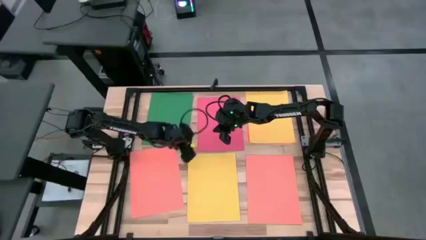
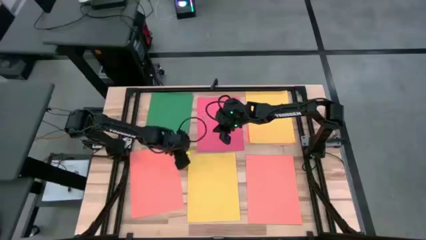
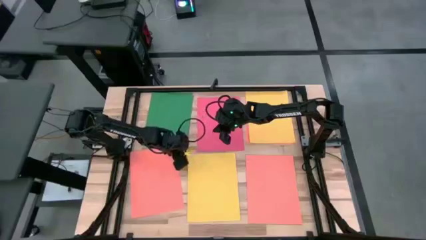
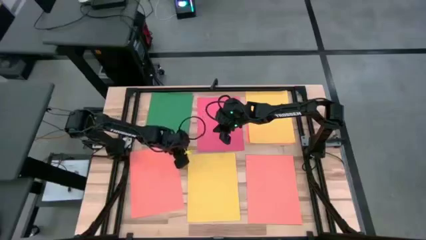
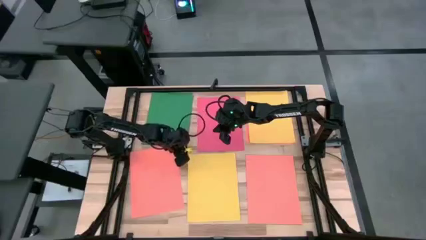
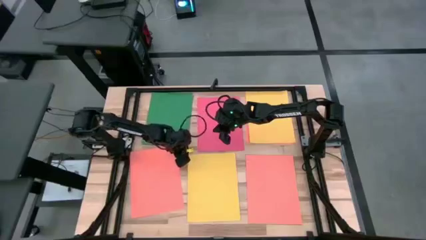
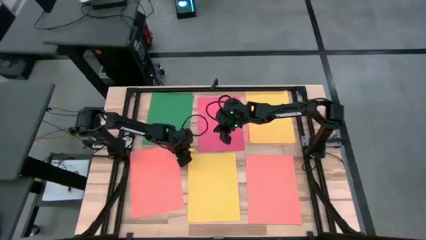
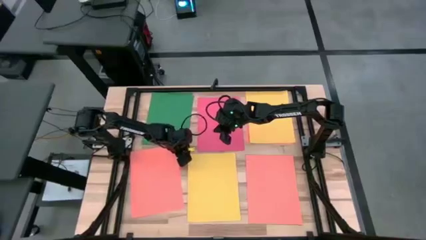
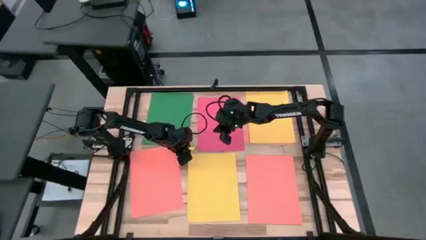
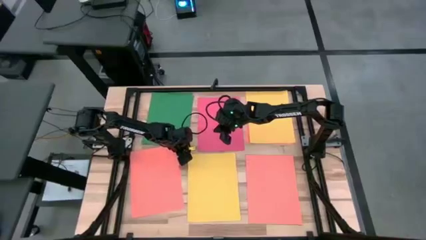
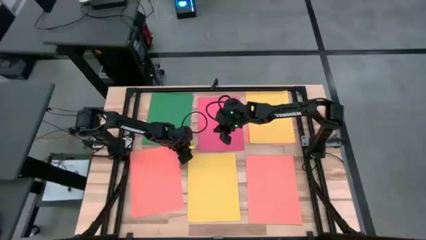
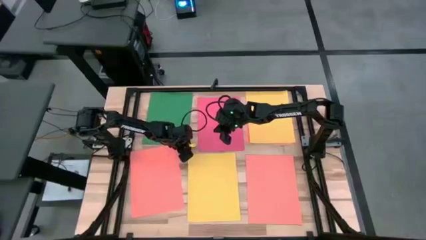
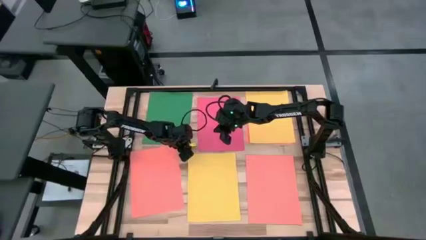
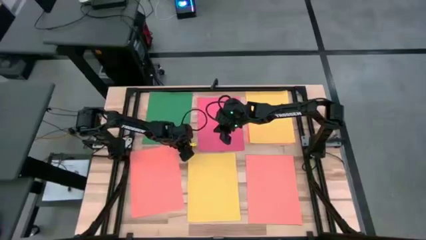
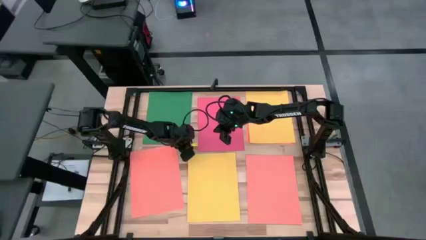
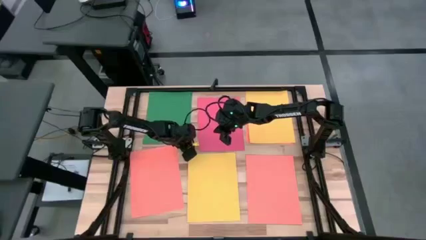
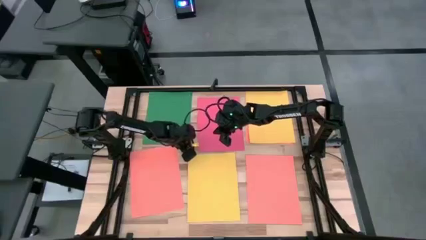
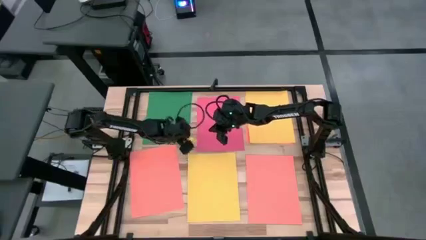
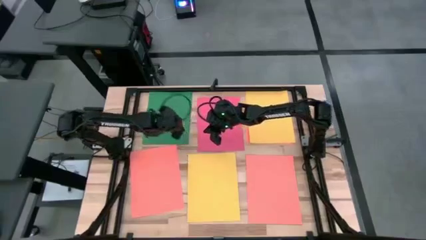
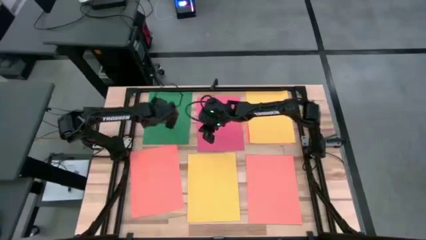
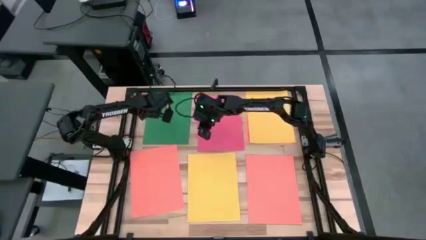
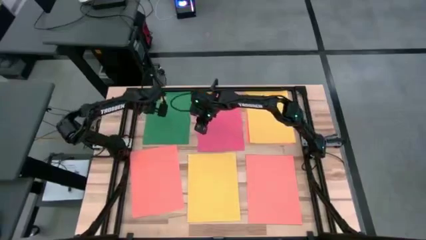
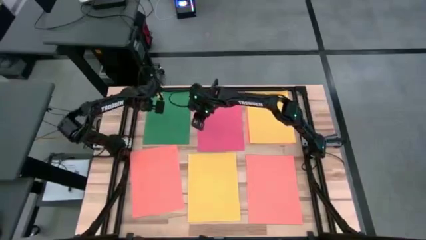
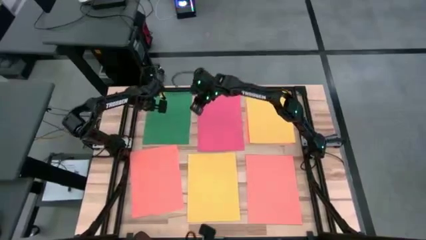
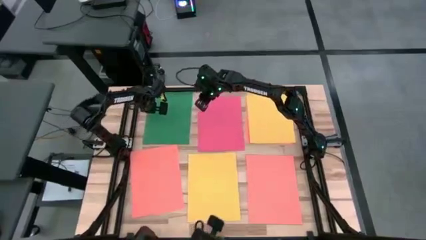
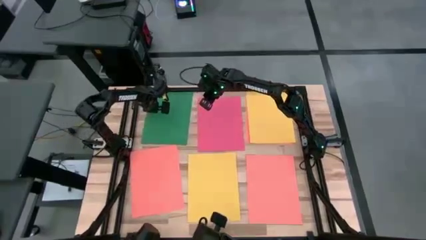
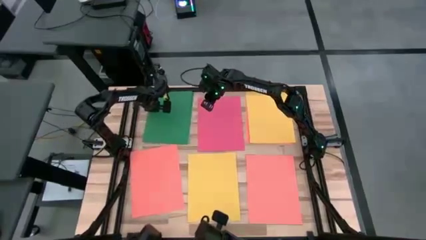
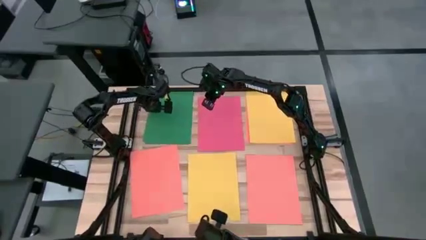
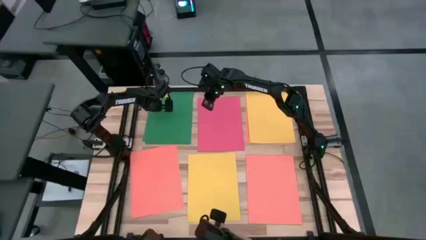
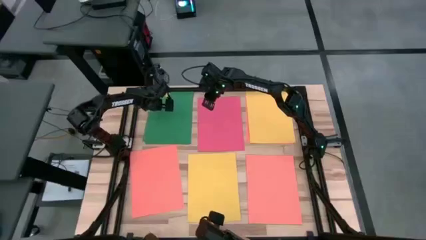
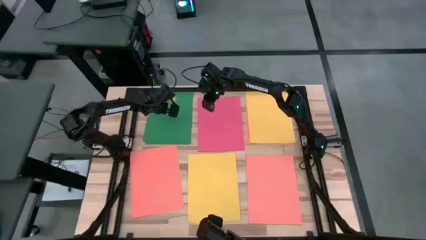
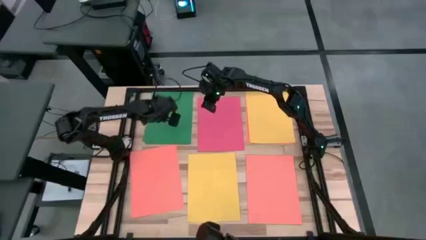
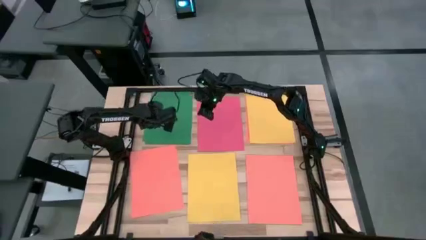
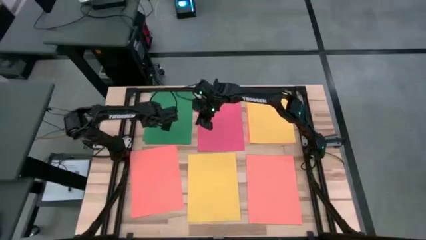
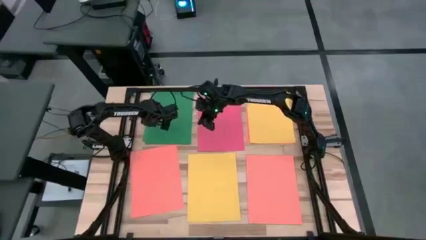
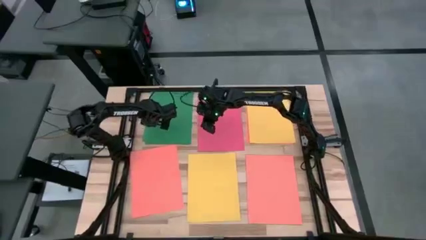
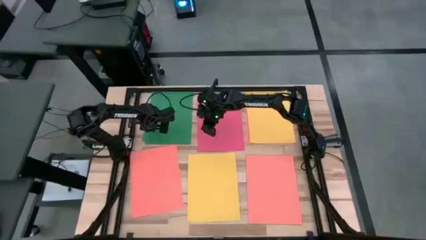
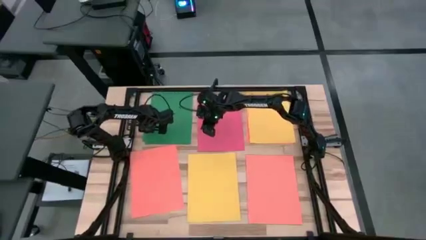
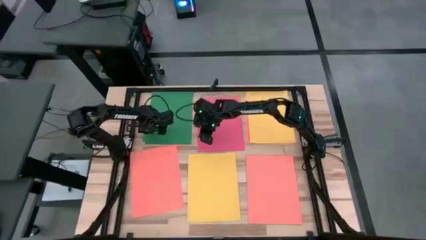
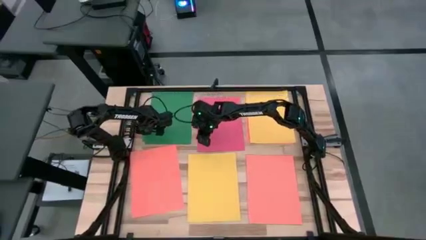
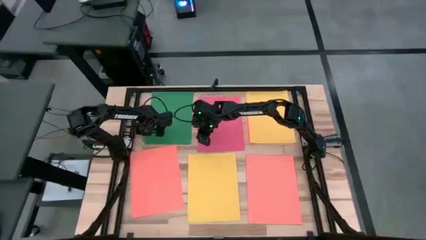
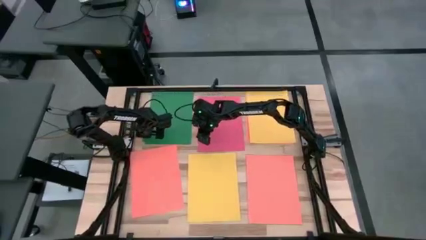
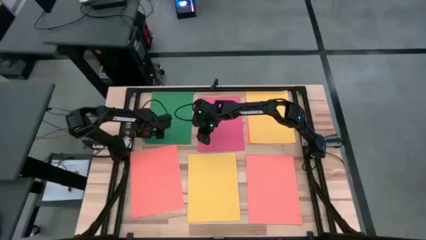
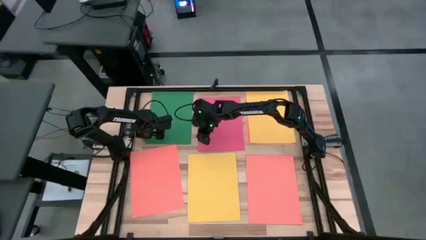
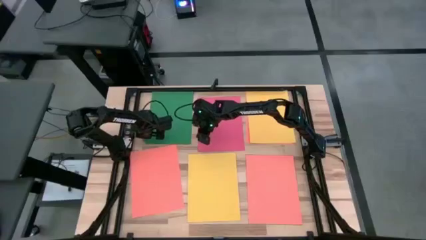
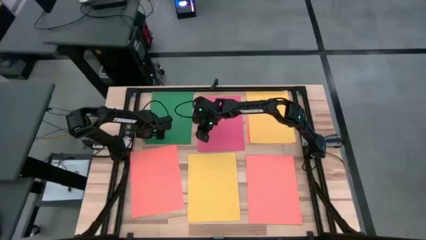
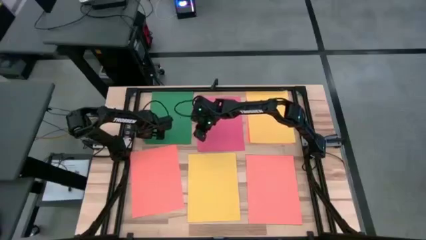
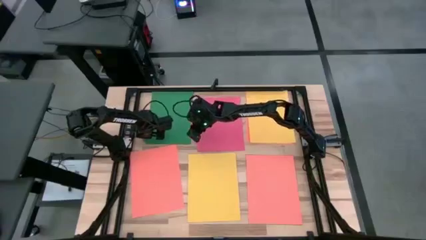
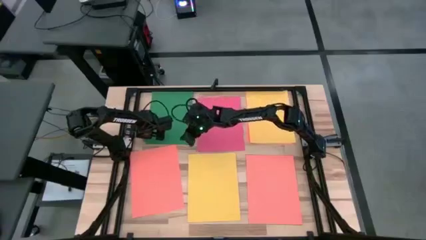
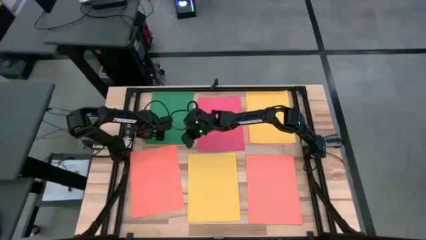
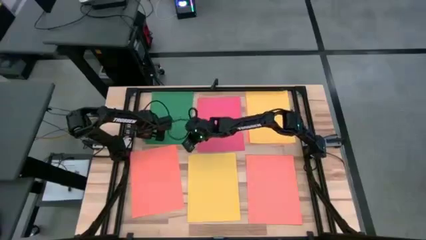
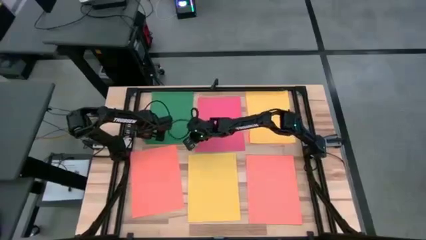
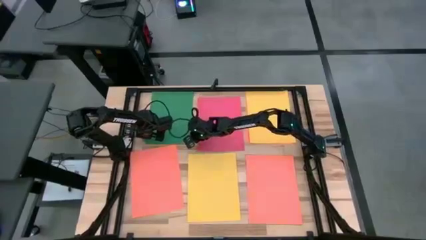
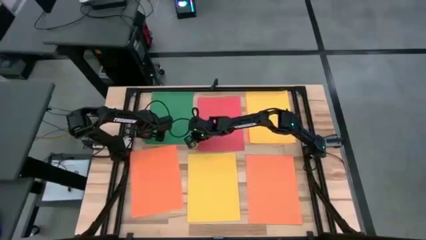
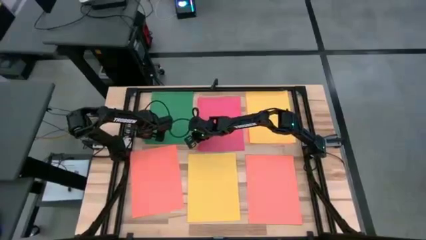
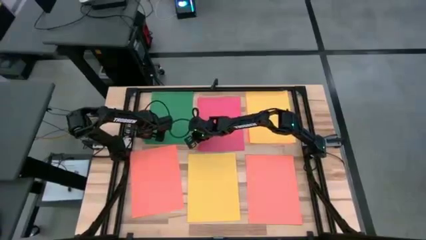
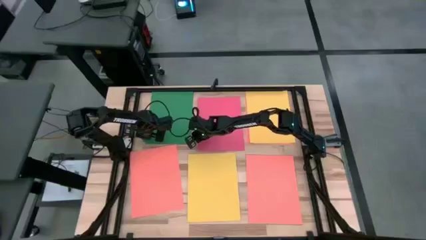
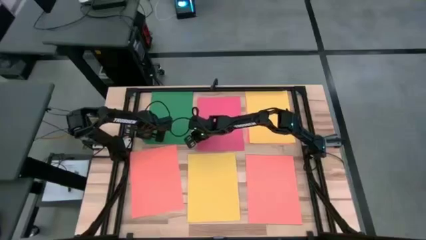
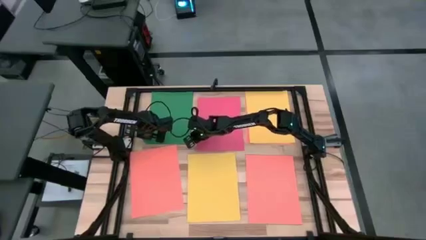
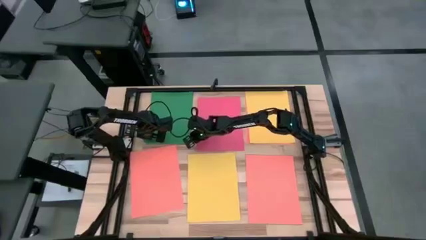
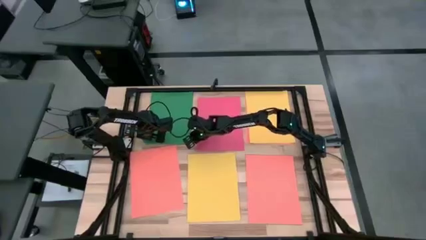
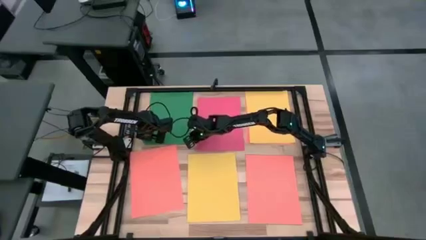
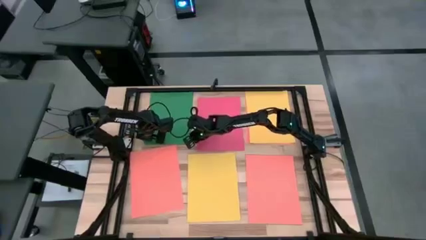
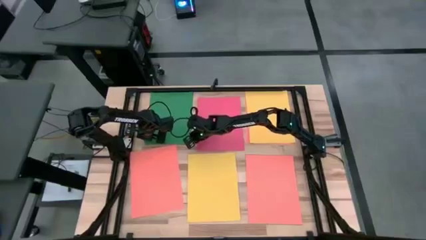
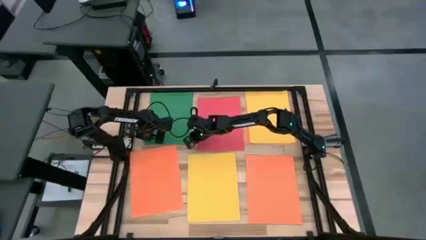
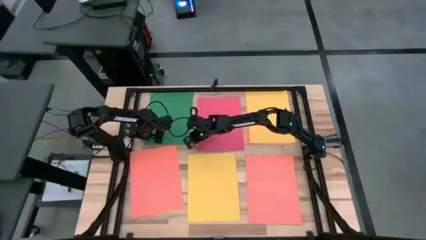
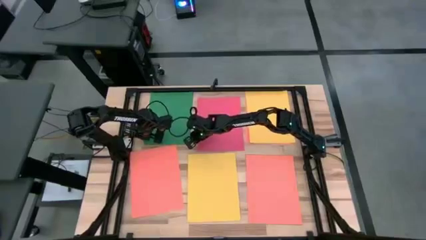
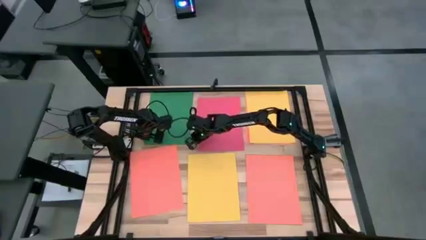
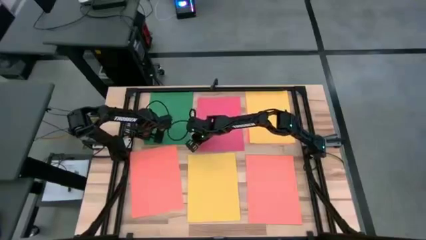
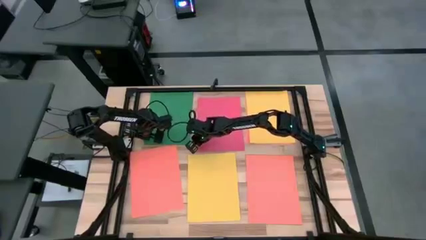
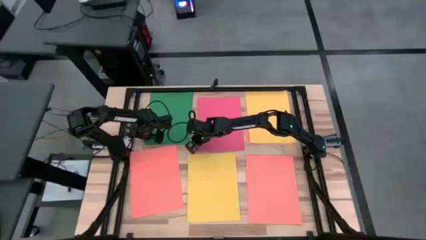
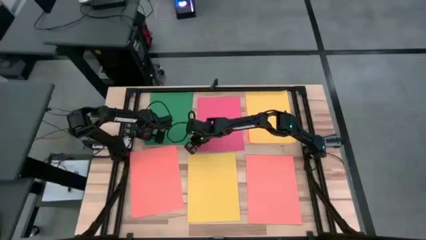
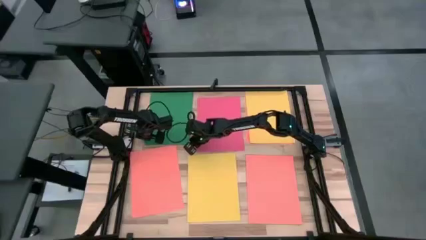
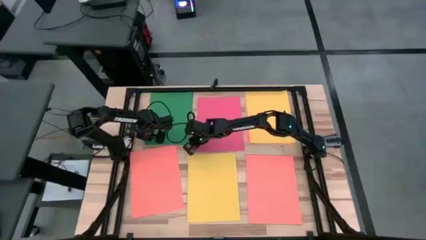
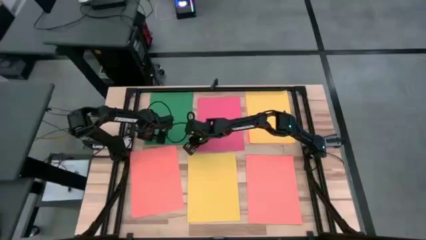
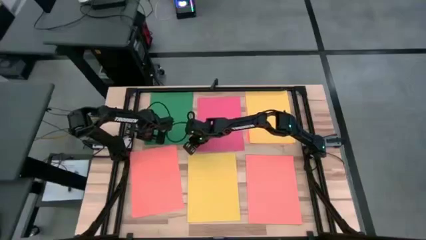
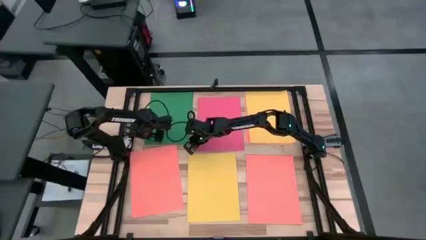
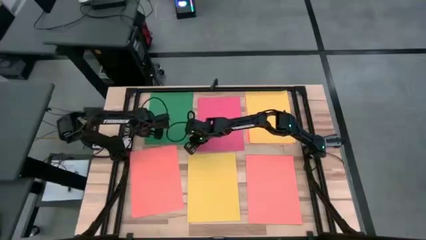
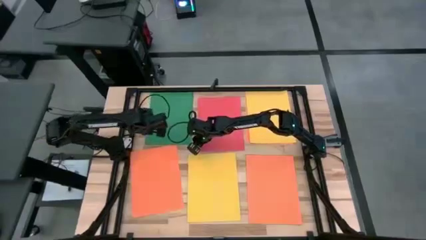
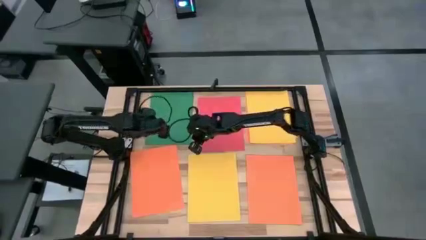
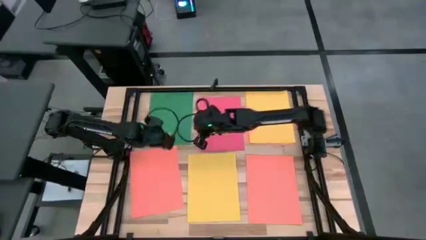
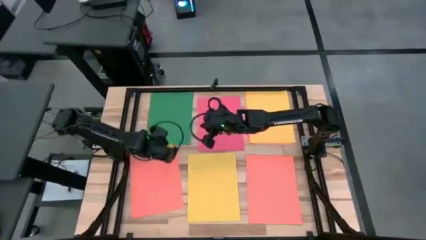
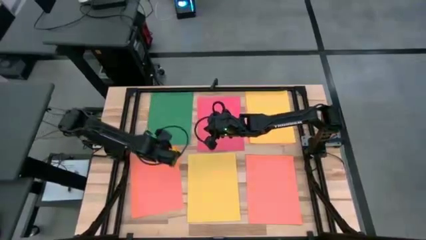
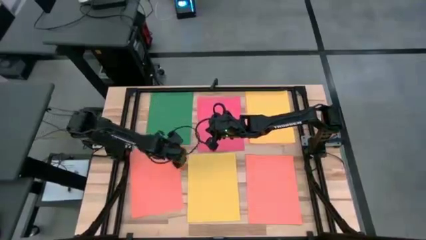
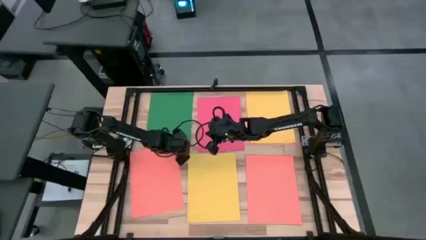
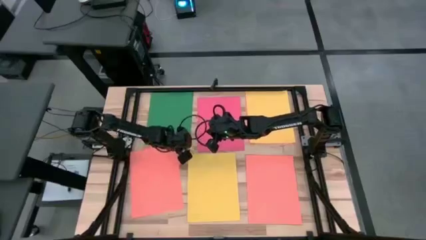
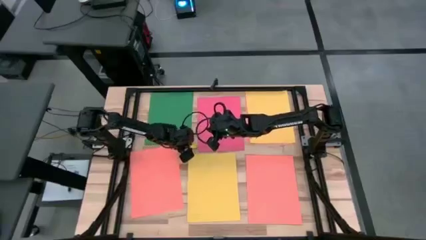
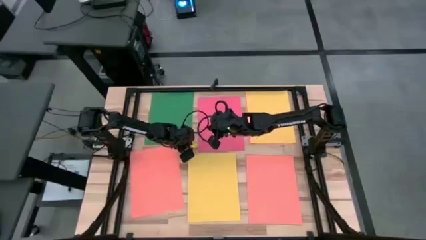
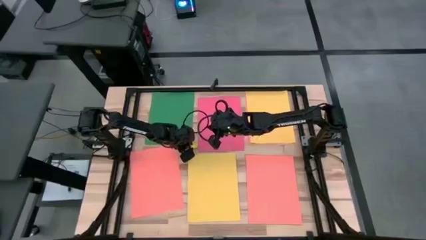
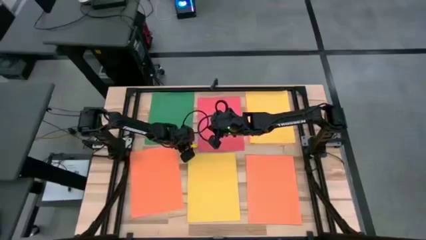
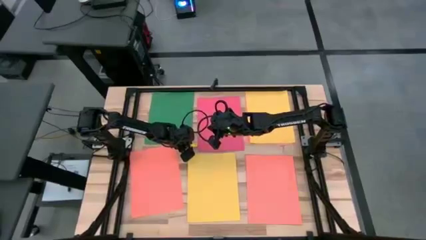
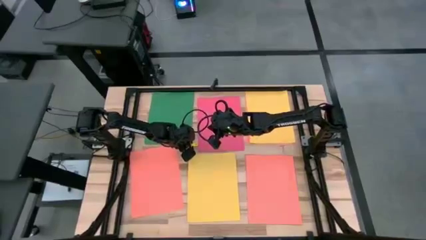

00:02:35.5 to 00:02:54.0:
Task: Organize paper
Stack the green paper on top of the green paper
